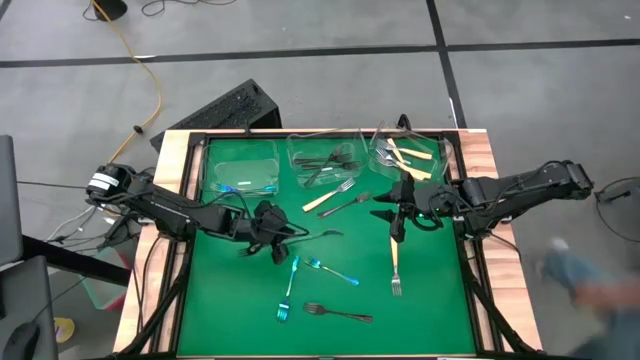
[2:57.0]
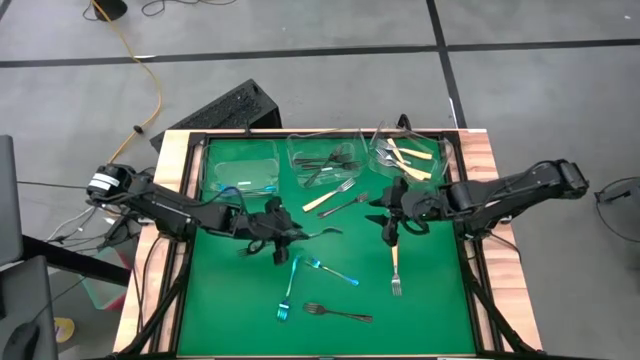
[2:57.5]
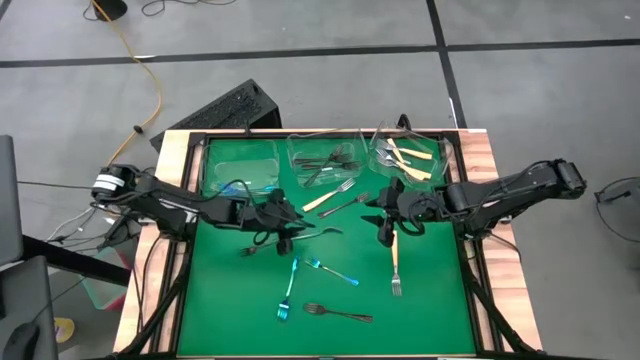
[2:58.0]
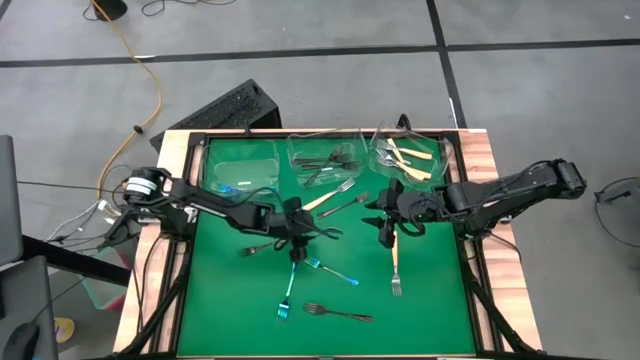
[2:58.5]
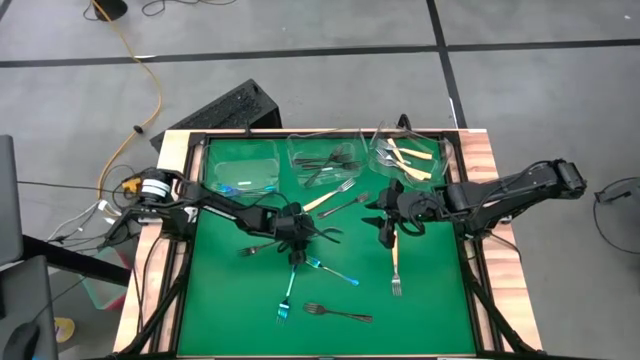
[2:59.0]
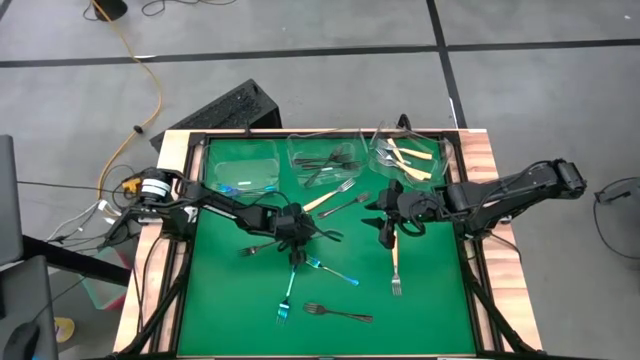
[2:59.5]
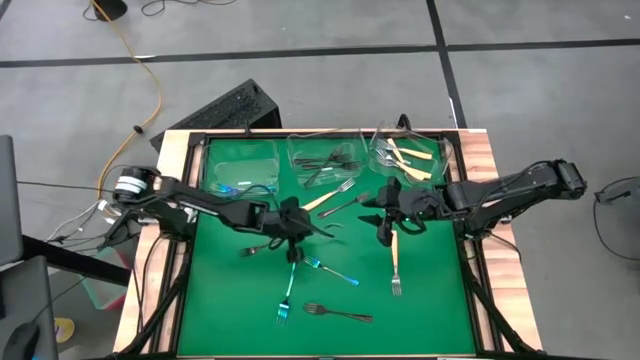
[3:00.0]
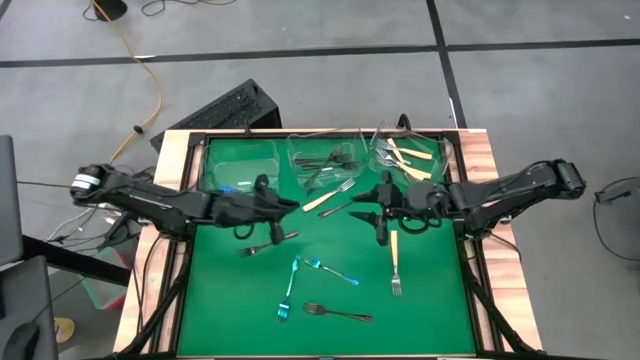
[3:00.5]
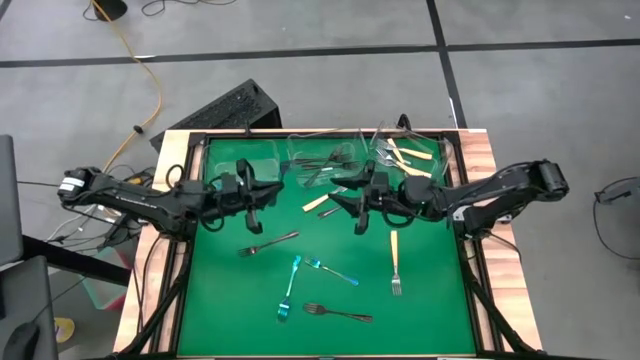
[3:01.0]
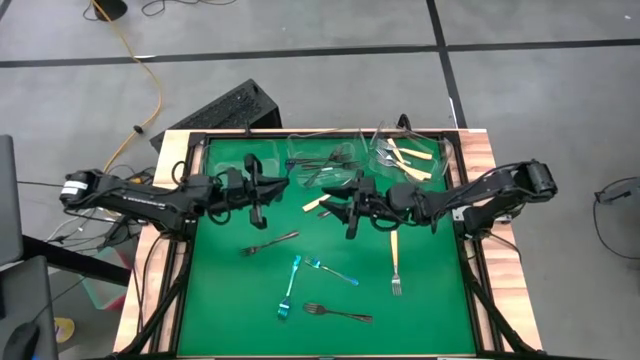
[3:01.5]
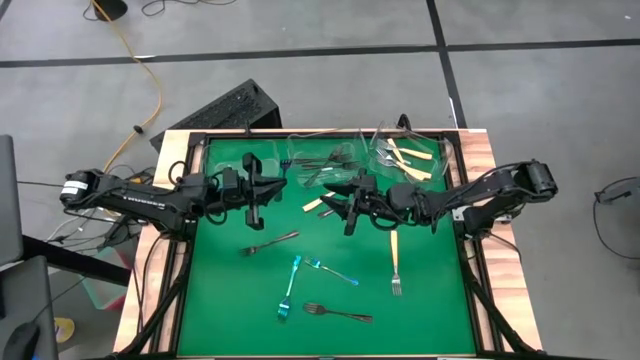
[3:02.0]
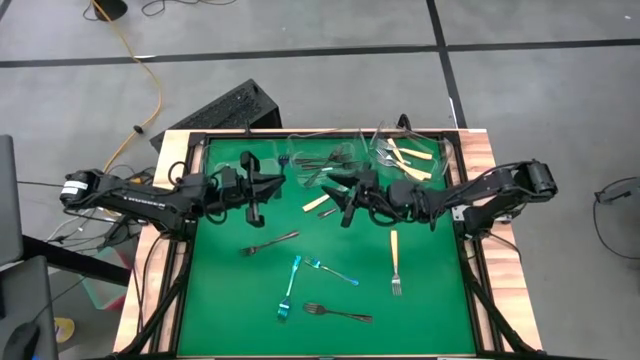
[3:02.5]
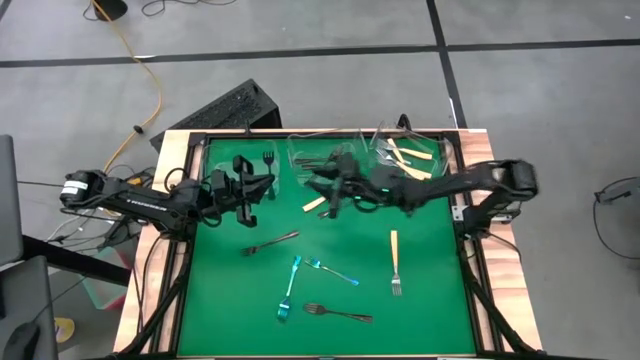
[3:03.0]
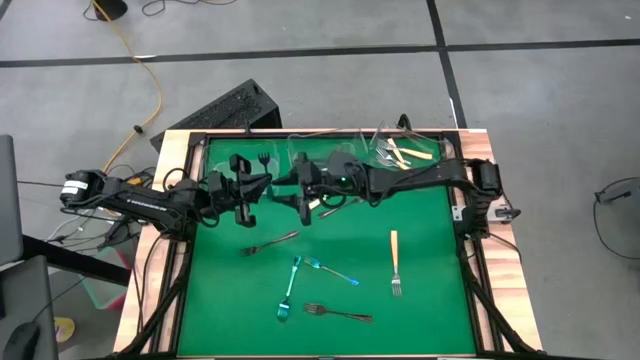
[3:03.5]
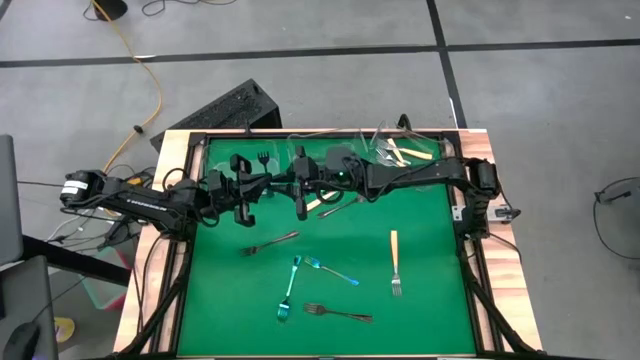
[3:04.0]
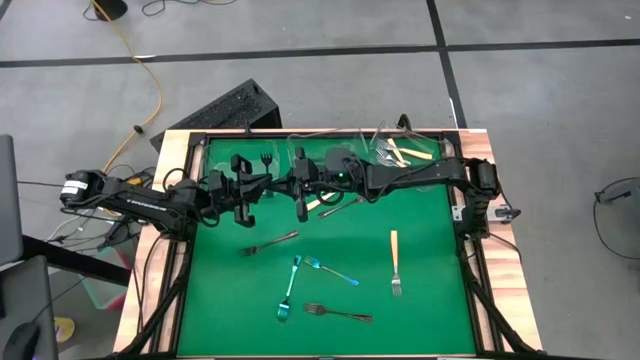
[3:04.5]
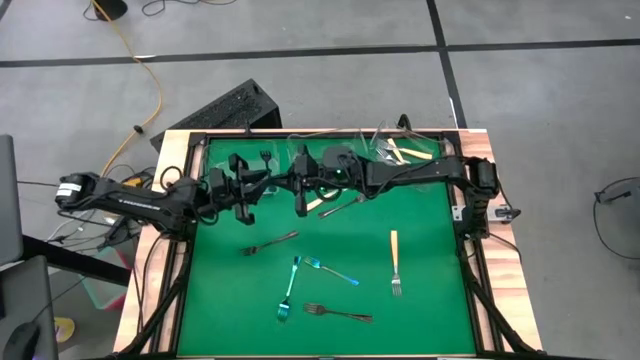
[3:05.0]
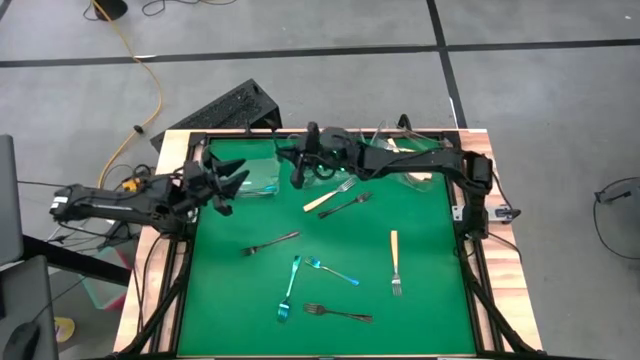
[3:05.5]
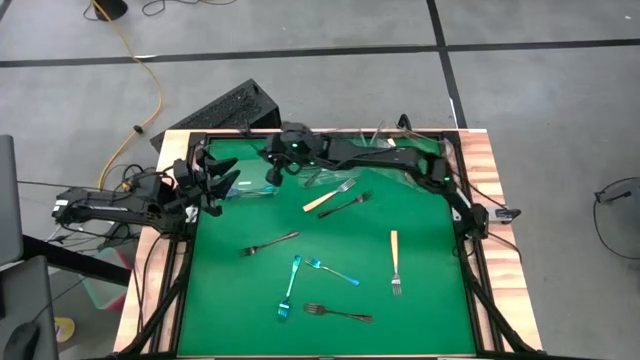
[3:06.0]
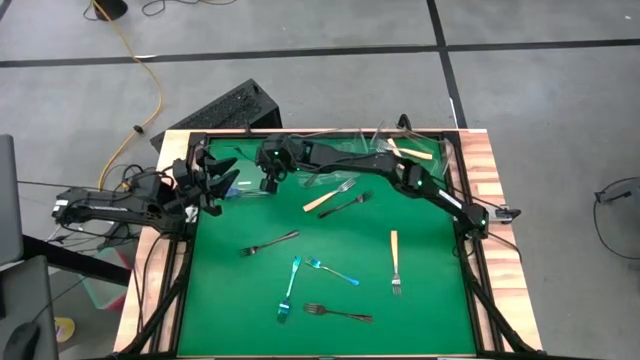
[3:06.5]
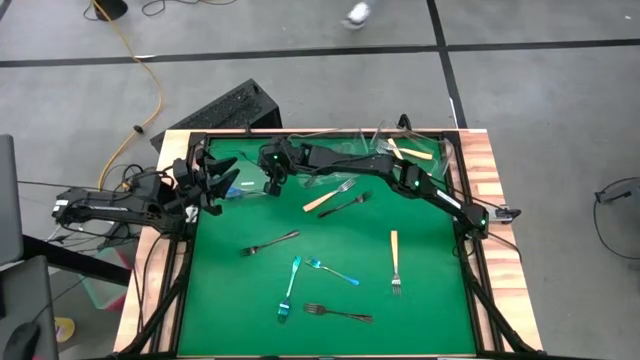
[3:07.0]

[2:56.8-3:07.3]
Task: Sort silverware by color (type)
Put the blue fork into the left transparent bin

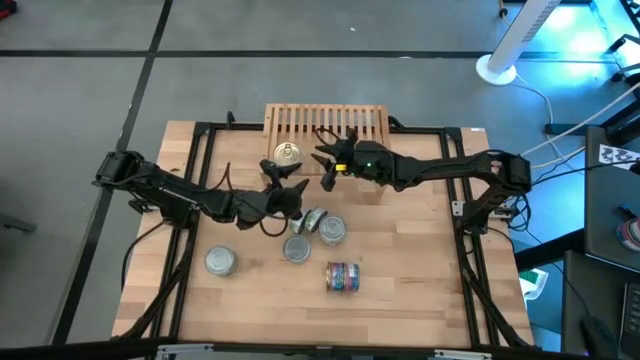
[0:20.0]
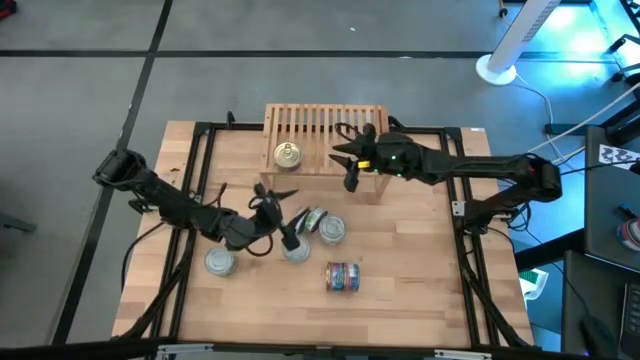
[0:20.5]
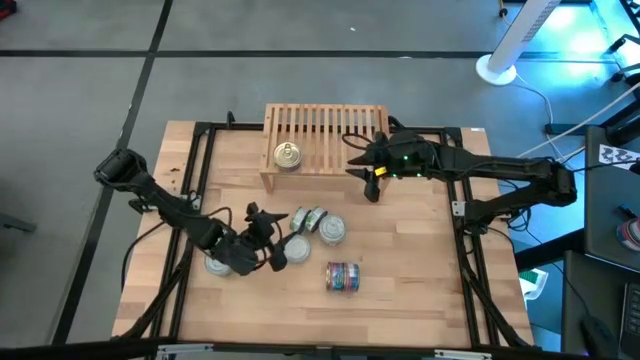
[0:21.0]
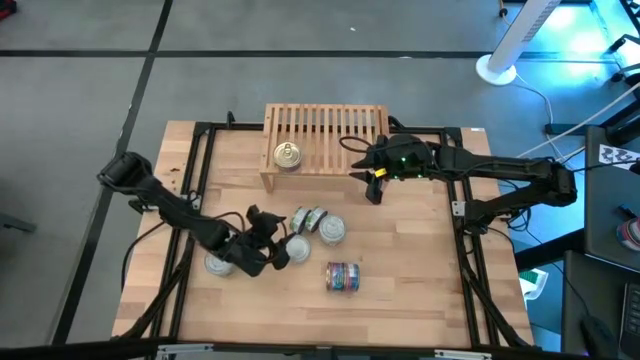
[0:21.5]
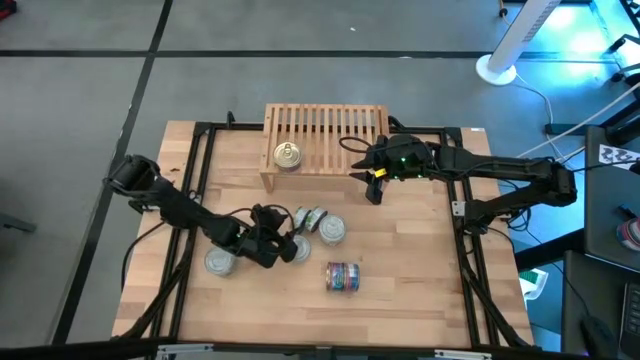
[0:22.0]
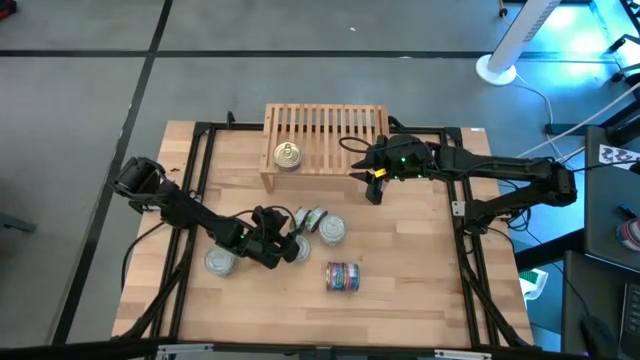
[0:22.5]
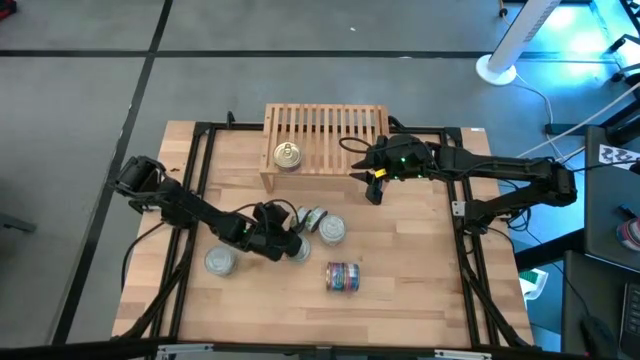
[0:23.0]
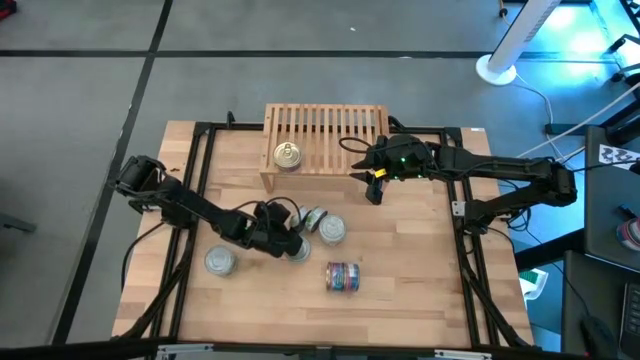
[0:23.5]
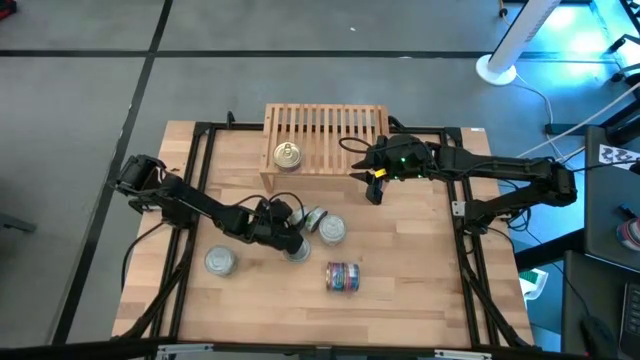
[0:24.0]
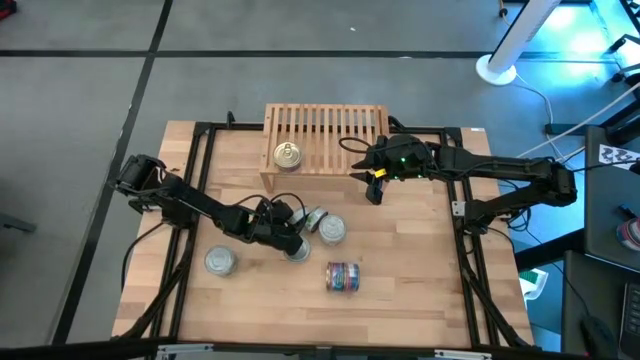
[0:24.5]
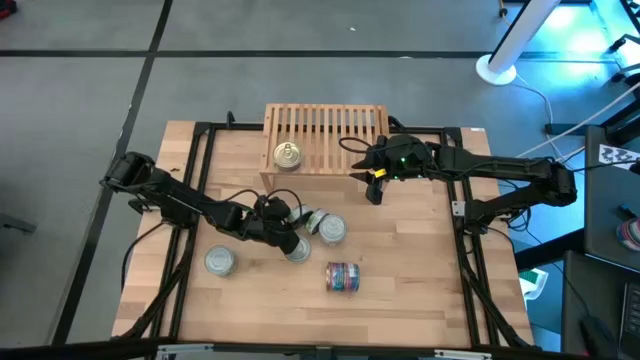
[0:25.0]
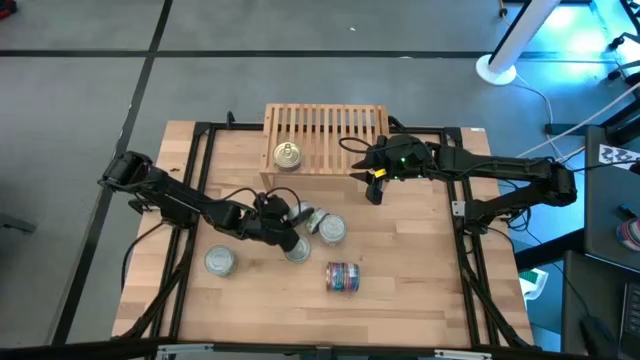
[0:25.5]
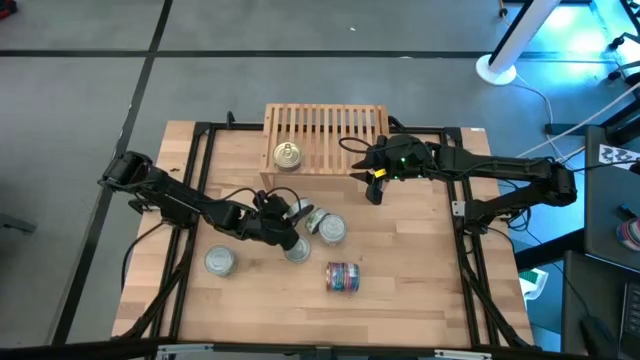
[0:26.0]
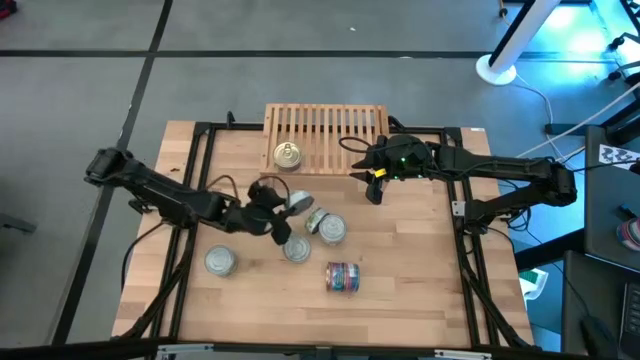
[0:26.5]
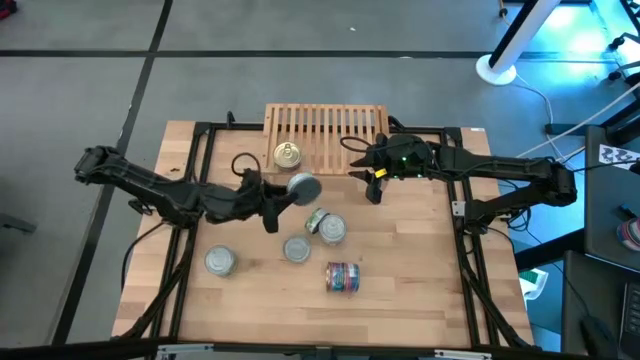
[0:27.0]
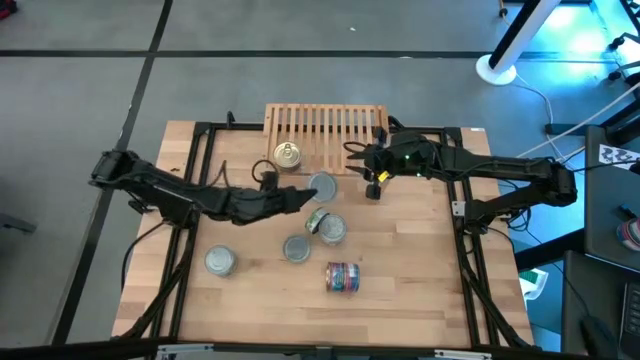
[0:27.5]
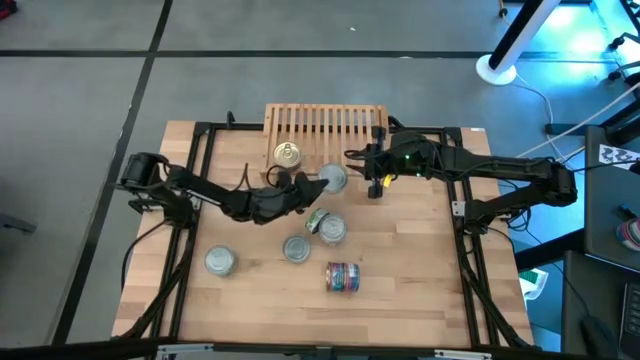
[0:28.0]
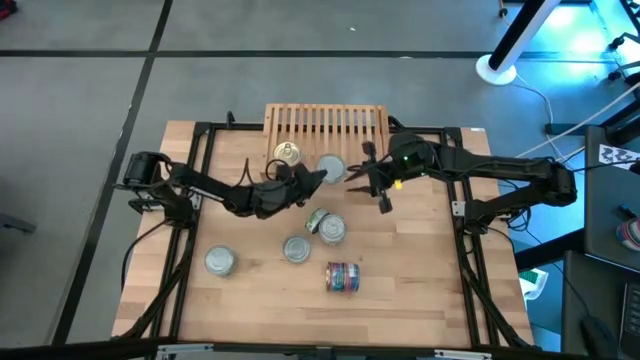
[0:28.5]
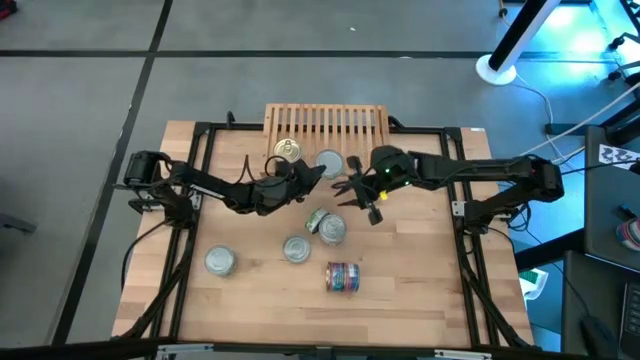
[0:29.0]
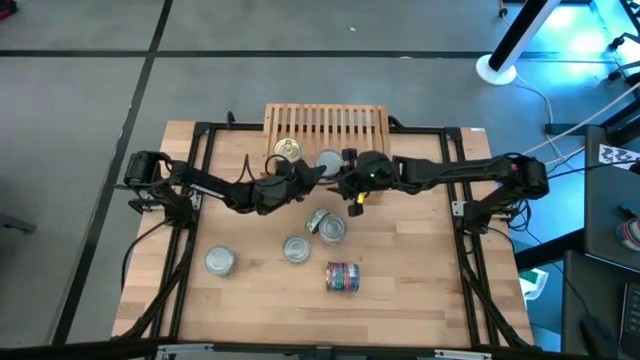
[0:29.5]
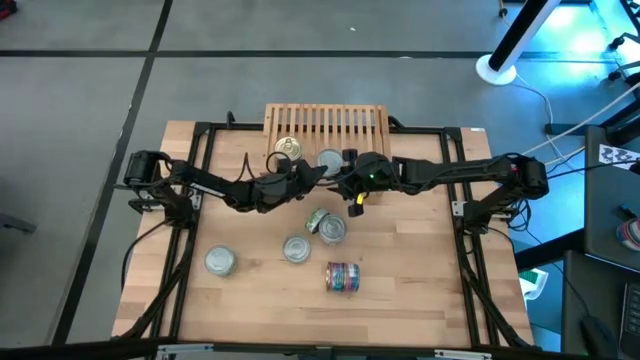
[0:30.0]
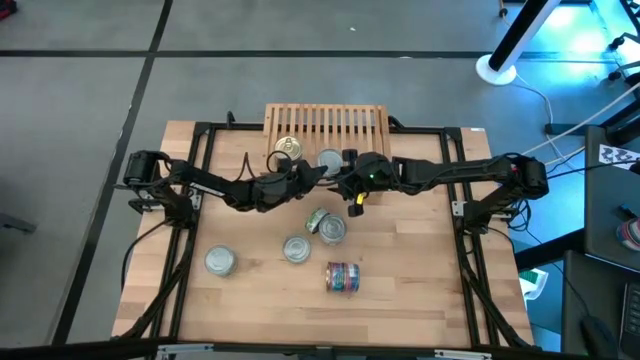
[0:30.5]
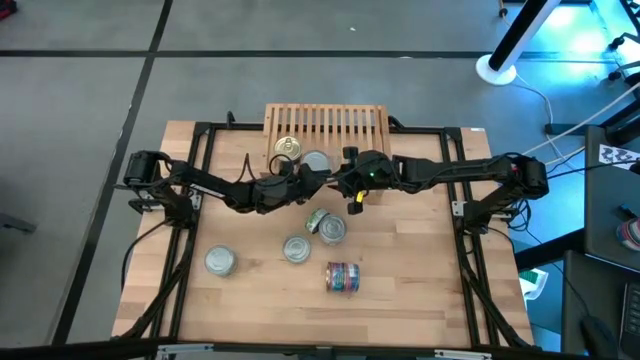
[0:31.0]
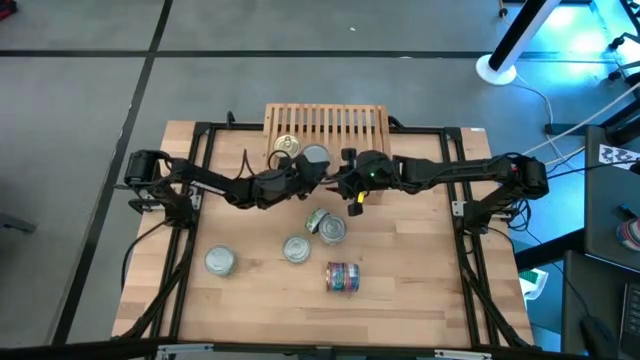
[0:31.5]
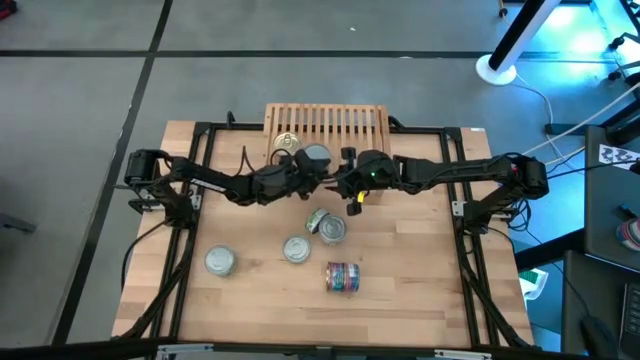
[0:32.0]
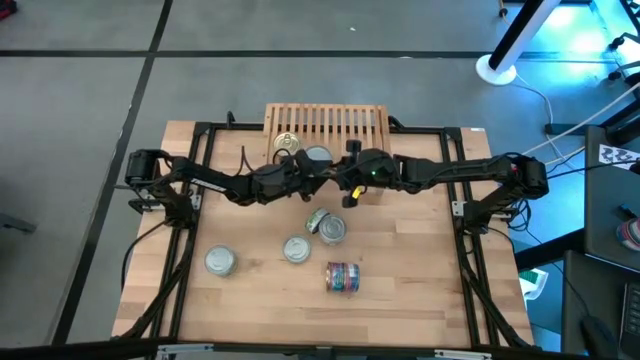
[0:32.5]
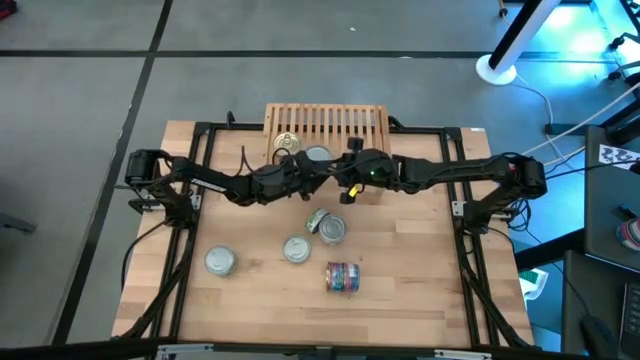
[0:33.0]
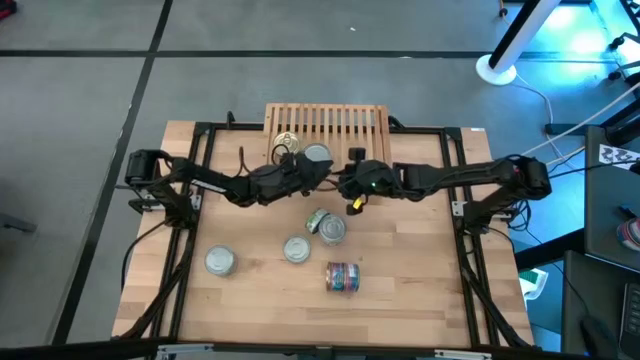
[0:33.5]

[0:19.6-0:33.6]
Task: Stack canned seafood by type on shelf
Put the green tuna can on the shelf
